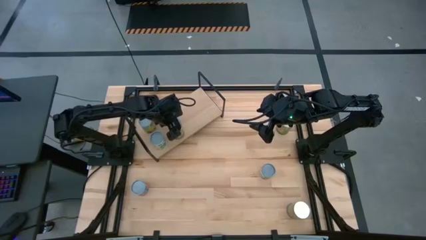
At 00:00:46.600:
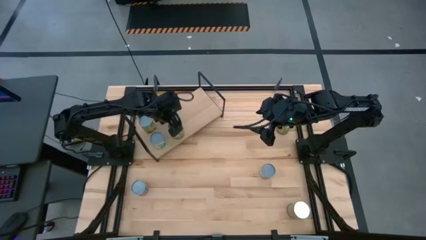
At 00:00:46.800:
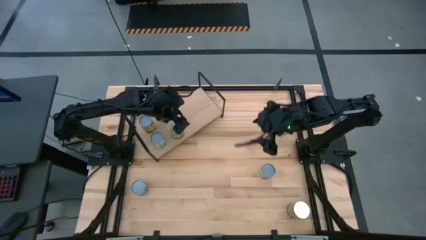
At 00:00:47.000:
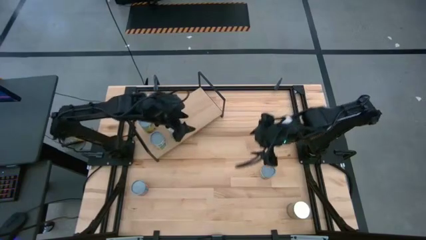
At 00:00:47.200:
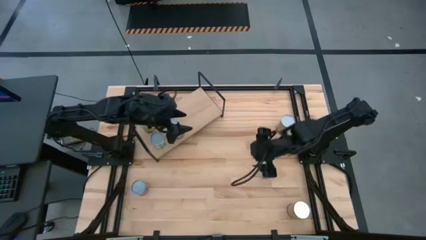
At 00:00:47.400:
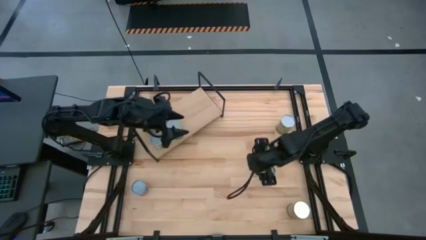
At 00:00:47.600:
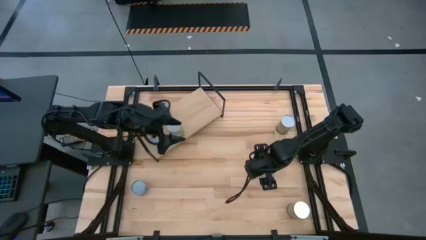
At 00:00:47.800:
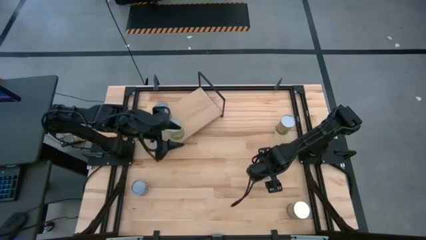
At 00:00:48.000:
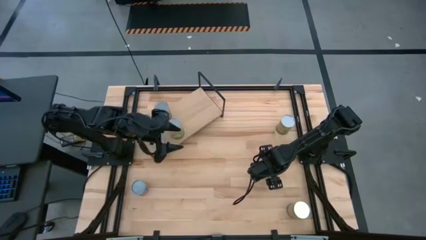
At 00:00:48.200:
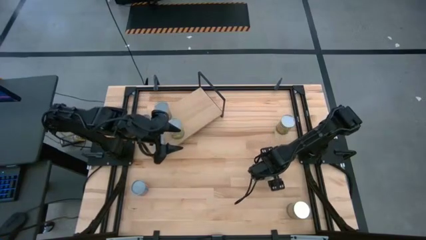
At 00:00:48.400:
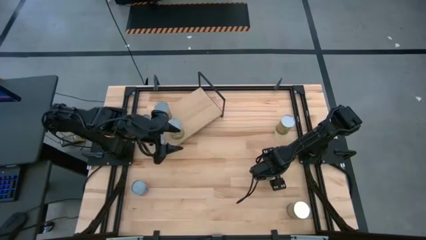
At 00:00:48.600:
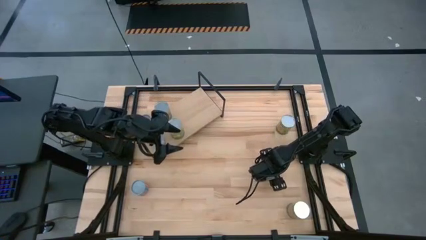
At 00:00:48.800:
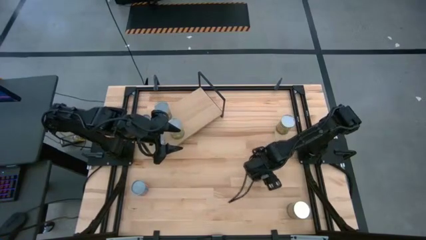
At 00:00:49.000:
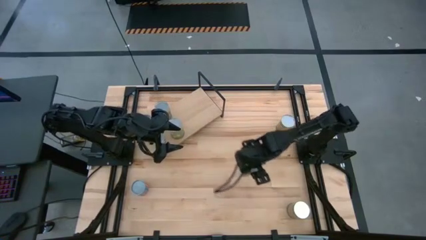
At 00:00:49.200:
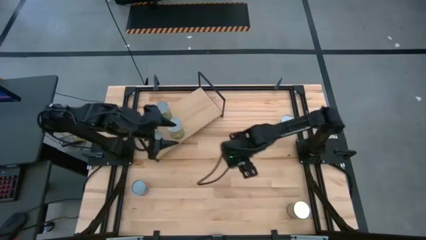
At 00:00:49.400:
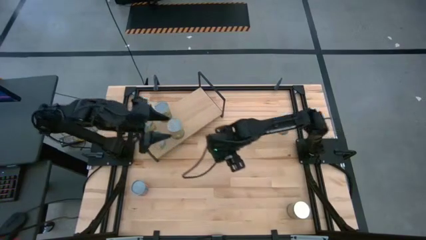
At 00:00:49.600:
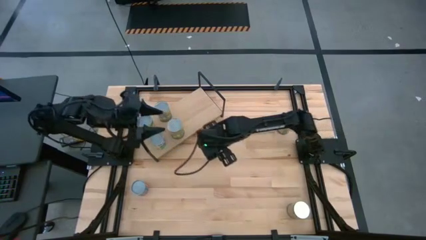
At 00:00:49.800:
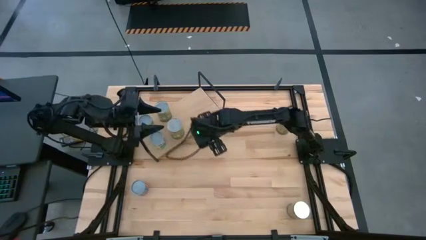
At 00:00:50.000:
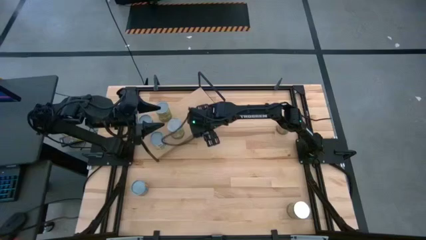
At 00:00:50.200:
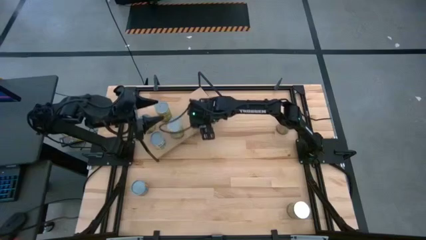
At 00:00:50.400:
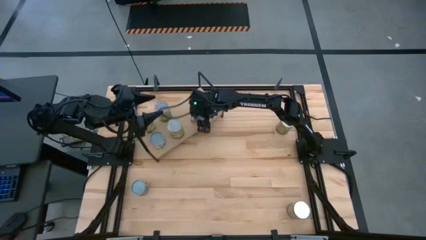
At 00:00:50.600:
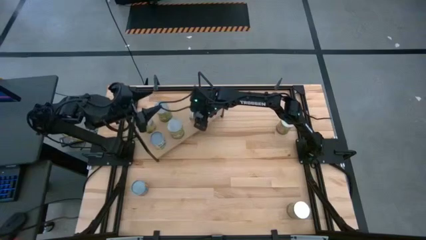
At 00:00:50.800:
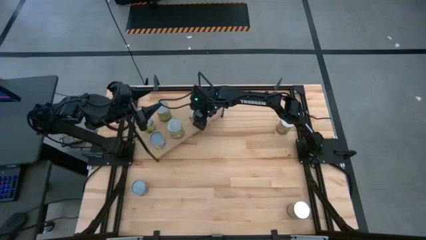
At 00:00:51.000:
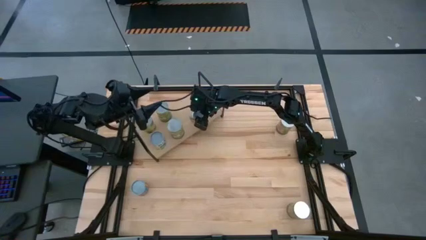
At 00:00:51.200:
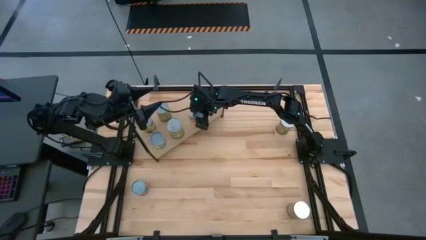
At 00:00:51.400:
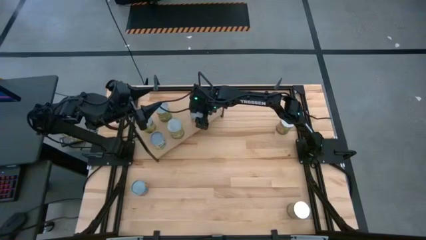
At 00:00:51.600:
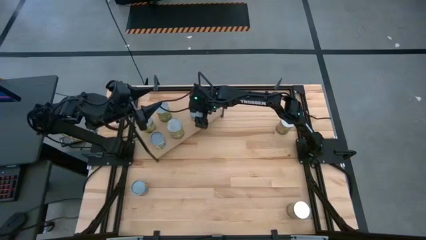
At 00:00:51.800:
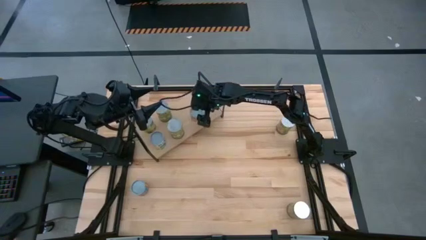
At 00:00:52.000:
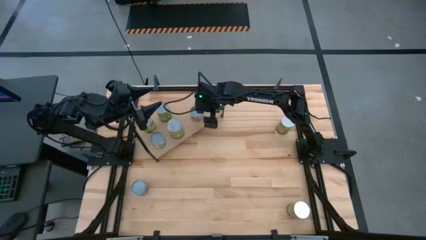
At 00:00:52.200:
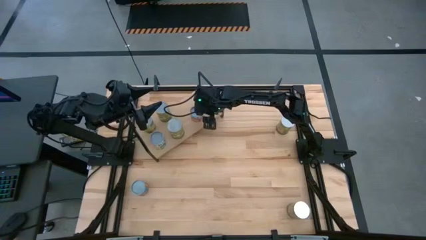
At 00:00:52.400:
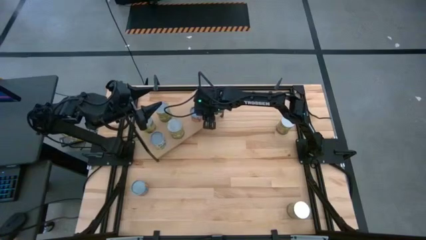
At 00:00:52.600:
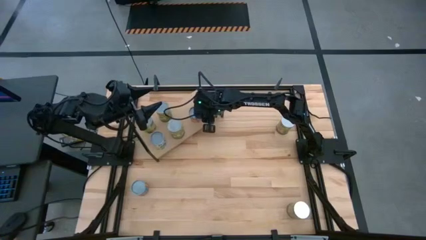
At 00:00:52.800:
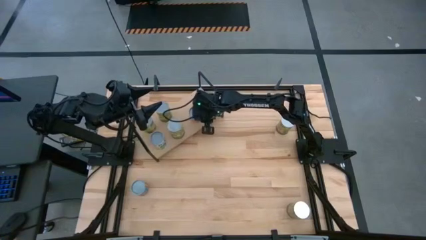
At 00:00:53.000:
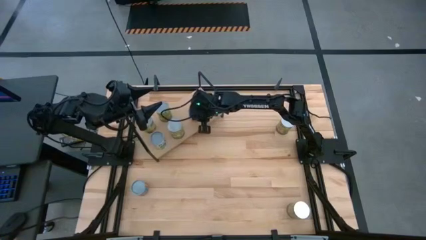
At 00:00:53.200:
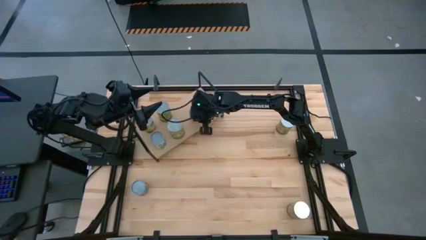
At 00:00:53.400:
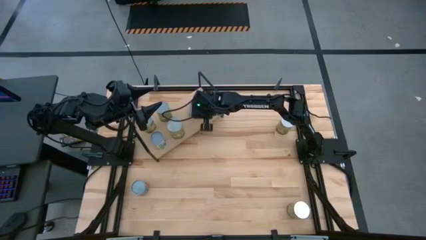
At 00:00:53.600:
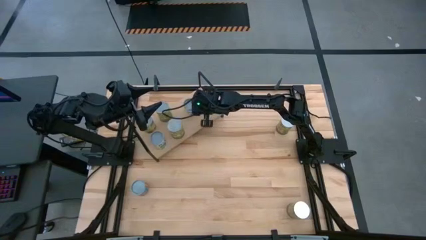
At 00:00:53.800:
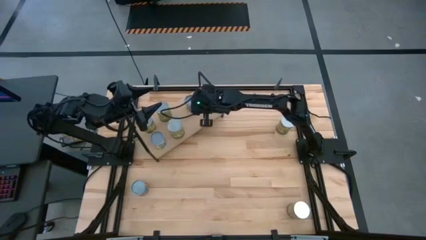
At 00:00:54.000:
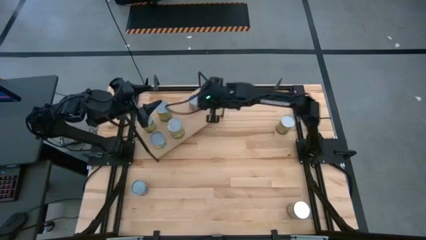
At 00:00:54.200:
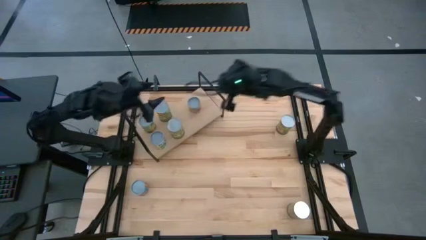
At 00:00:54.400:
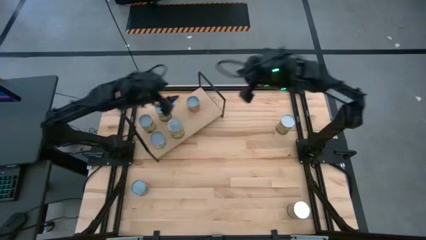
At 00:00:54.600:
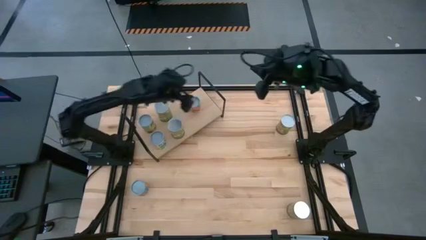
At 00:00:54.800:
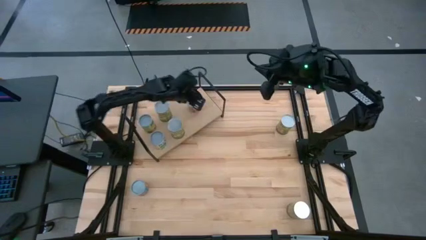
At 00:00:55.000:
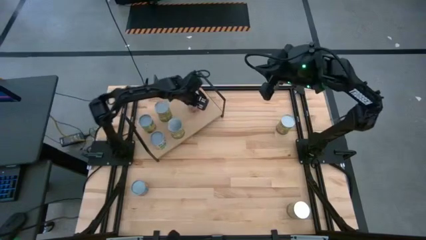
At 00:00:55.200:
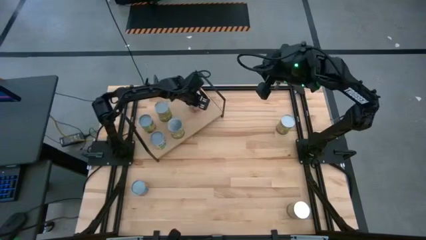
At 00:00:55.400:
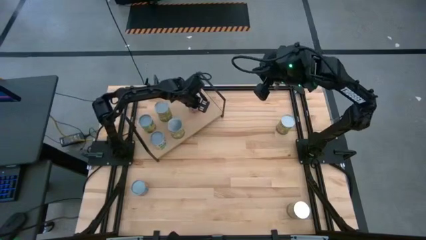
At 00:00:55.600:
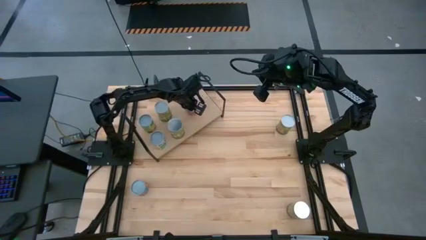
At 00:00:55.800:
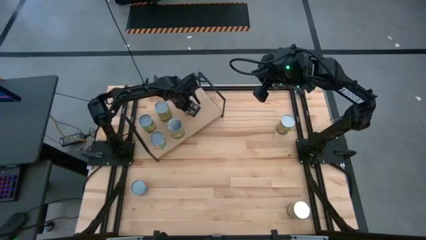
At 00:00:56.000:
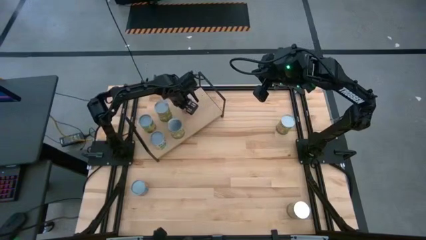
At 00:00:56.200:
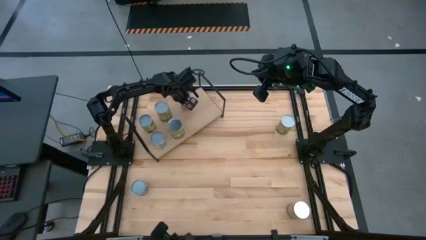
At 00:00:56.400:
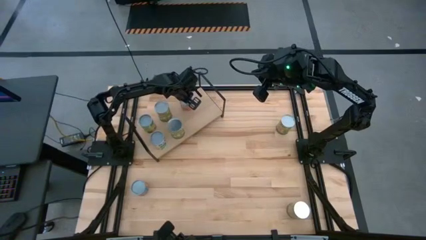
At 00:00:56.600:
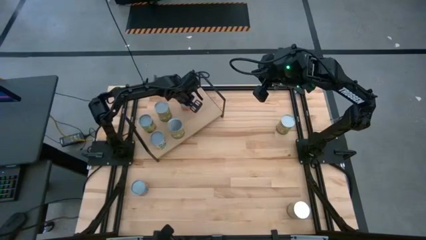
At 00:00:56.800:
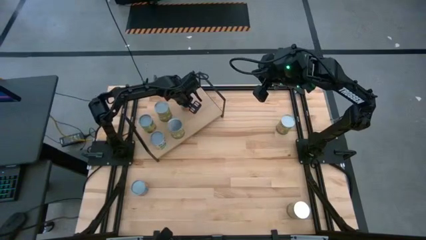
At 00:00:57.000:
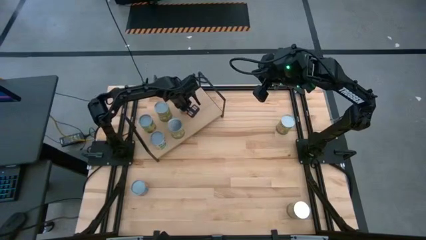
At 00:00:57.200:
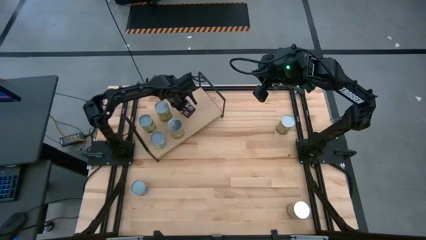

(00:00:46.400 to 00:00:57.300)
Task: Pick and place cans onto a shelf
Put the small canned oranges on the shelf
